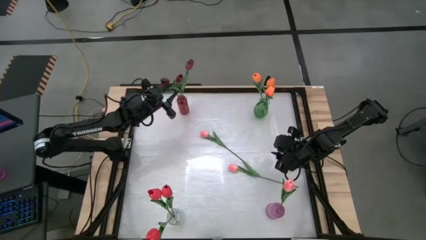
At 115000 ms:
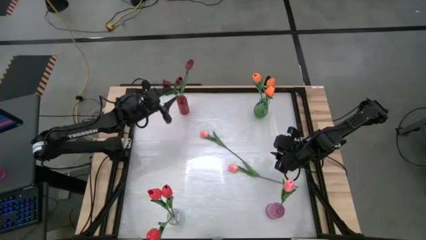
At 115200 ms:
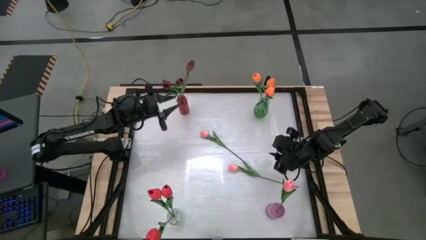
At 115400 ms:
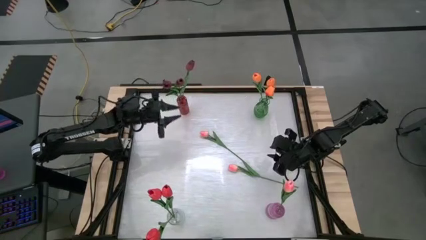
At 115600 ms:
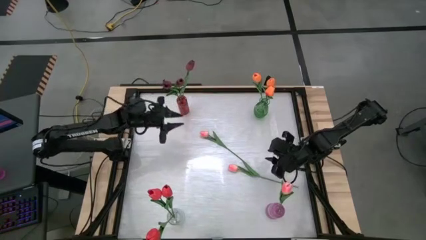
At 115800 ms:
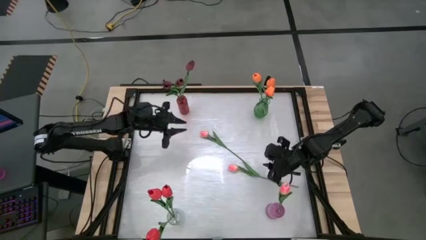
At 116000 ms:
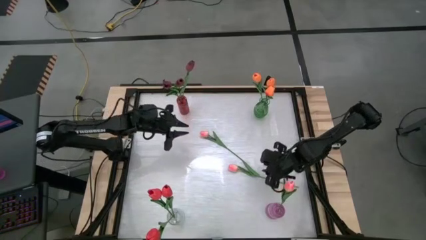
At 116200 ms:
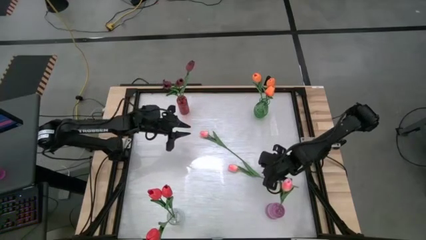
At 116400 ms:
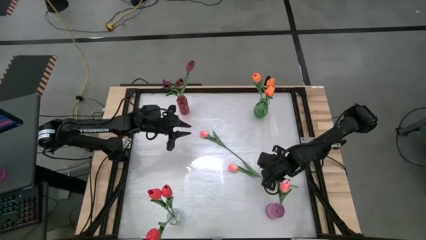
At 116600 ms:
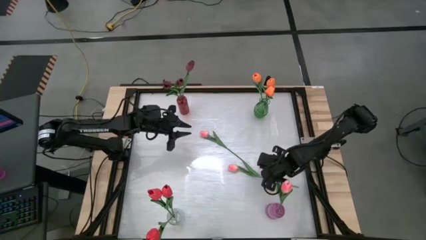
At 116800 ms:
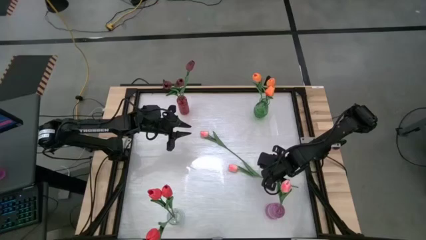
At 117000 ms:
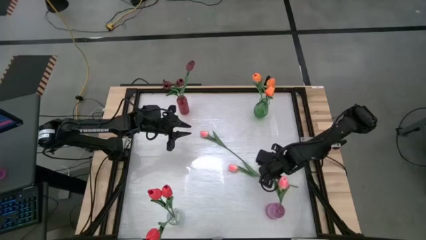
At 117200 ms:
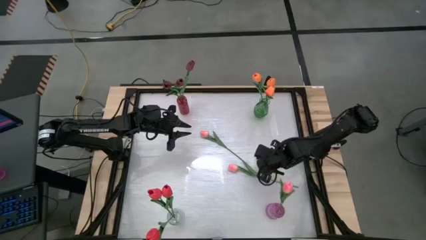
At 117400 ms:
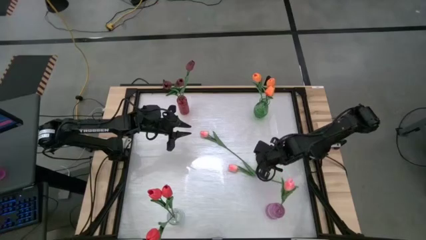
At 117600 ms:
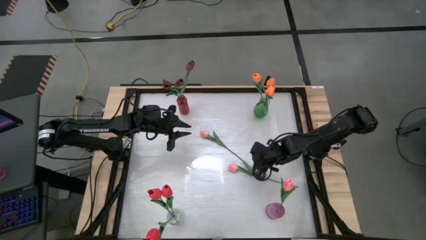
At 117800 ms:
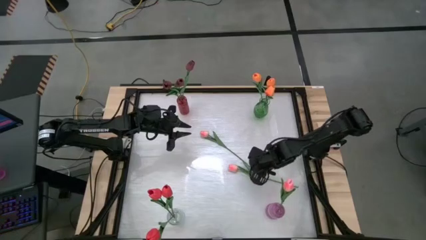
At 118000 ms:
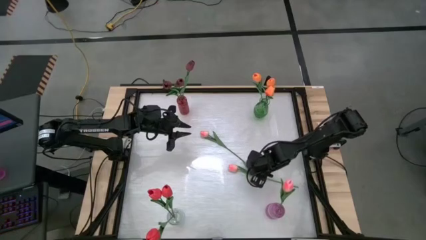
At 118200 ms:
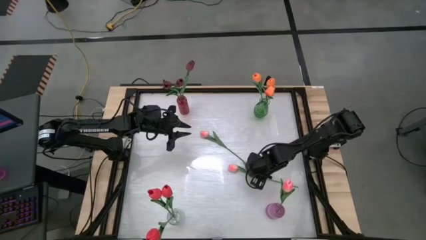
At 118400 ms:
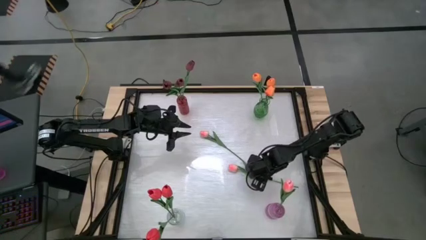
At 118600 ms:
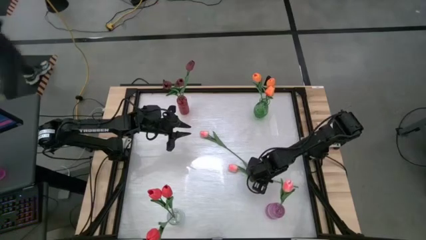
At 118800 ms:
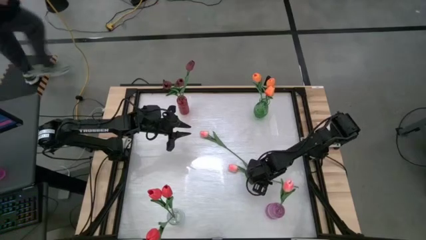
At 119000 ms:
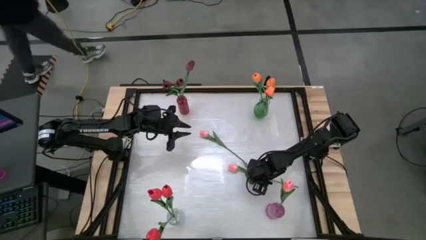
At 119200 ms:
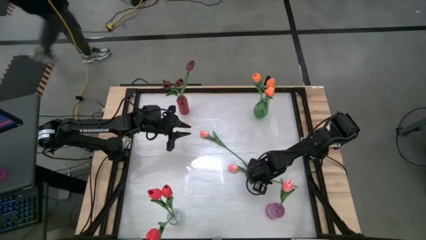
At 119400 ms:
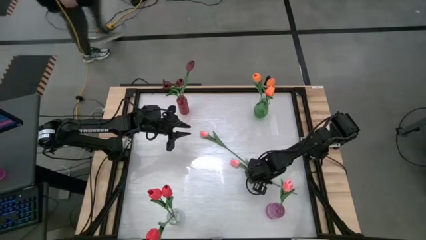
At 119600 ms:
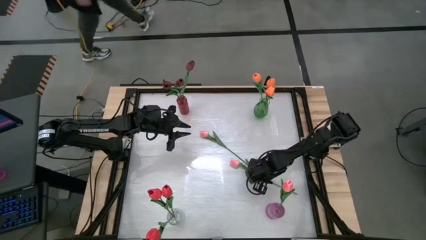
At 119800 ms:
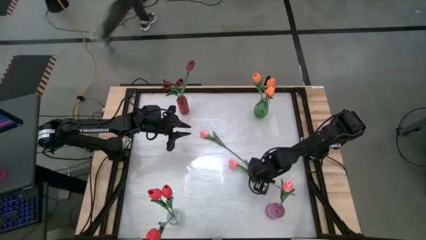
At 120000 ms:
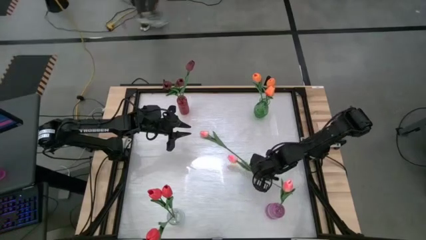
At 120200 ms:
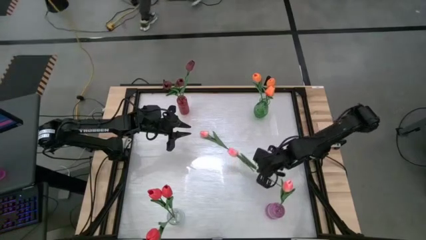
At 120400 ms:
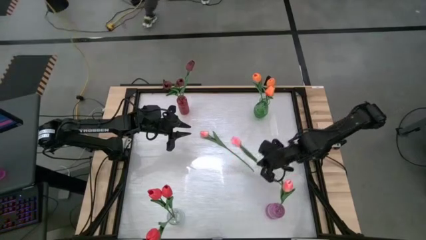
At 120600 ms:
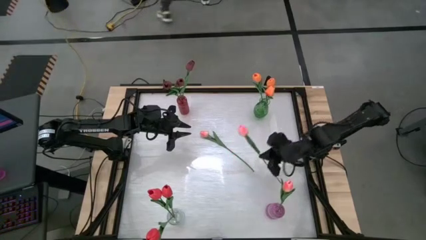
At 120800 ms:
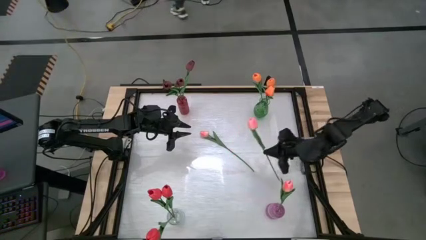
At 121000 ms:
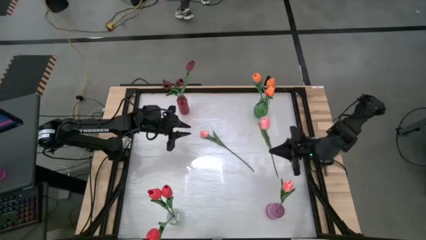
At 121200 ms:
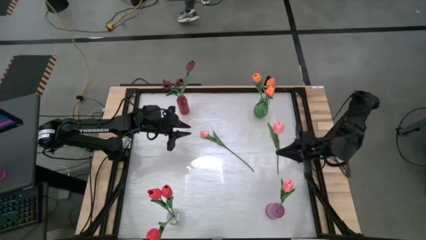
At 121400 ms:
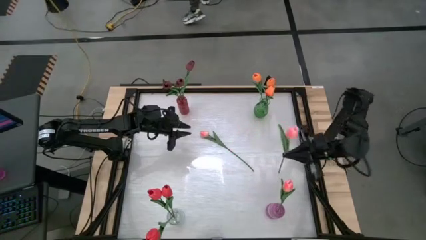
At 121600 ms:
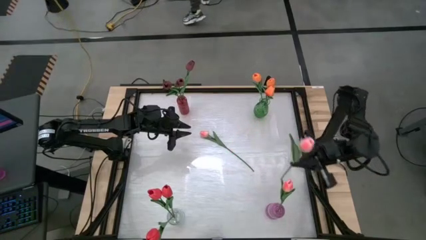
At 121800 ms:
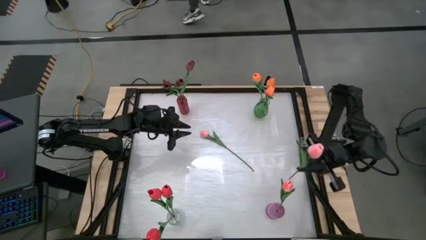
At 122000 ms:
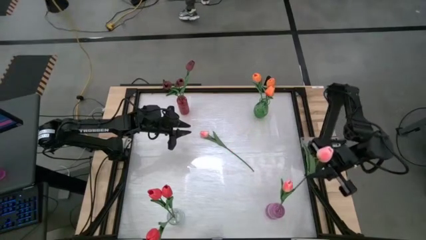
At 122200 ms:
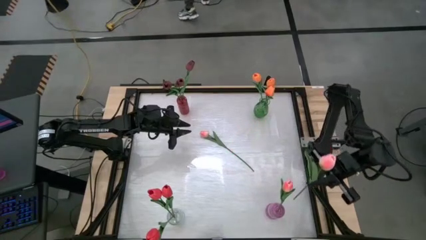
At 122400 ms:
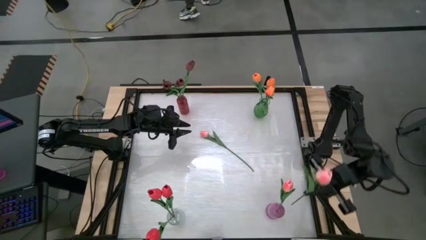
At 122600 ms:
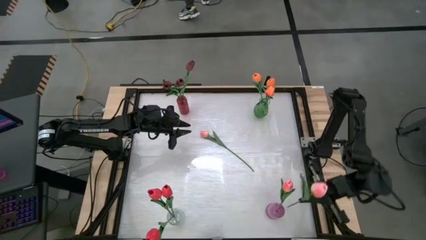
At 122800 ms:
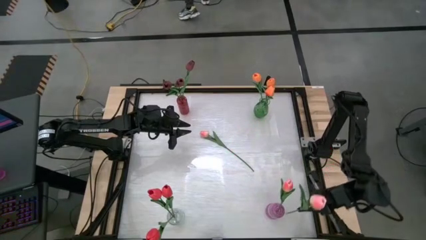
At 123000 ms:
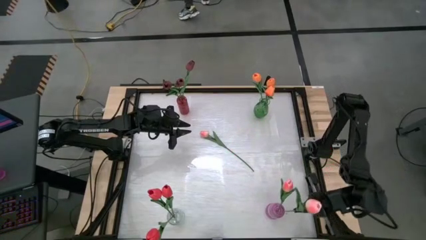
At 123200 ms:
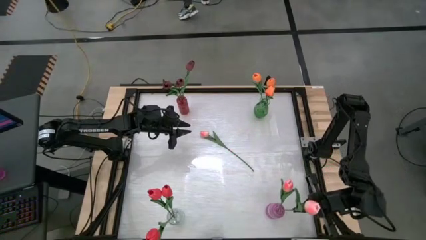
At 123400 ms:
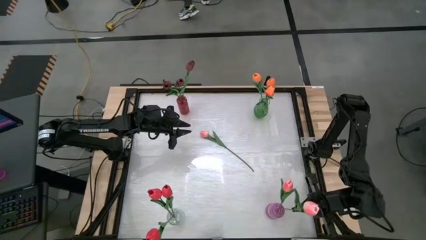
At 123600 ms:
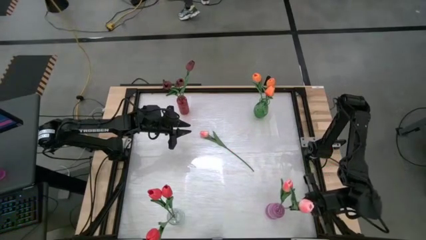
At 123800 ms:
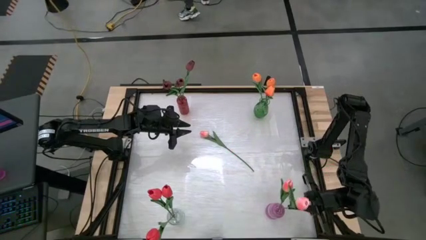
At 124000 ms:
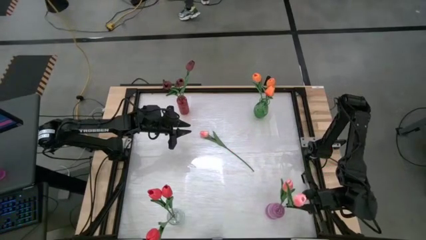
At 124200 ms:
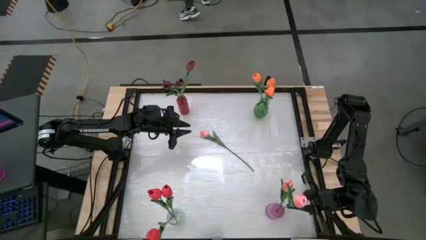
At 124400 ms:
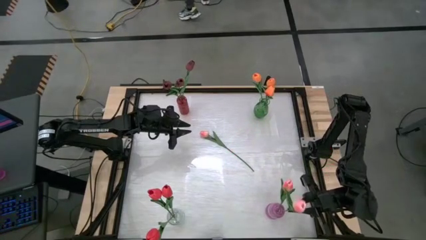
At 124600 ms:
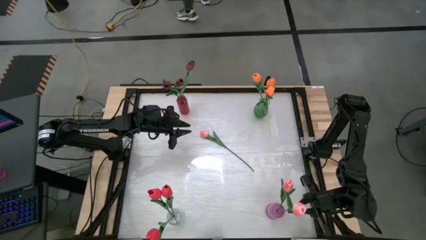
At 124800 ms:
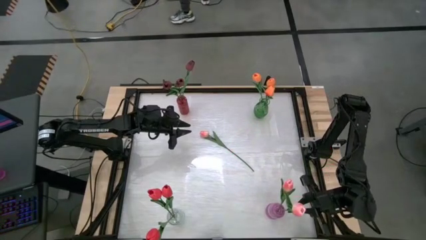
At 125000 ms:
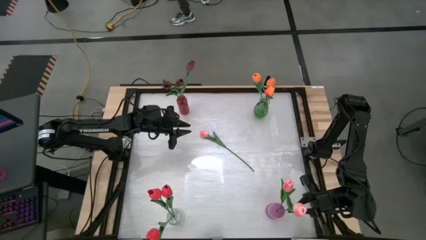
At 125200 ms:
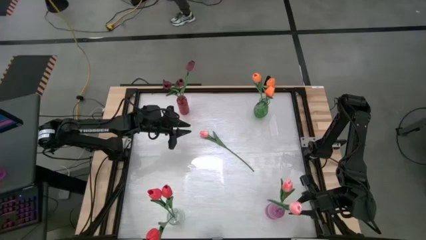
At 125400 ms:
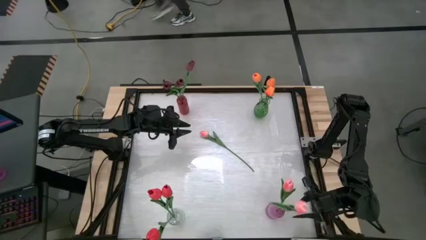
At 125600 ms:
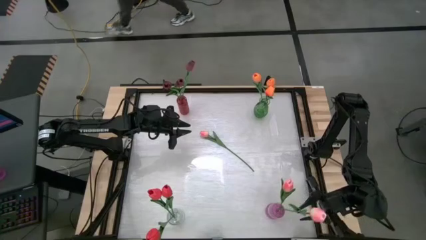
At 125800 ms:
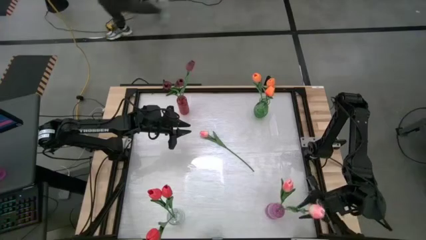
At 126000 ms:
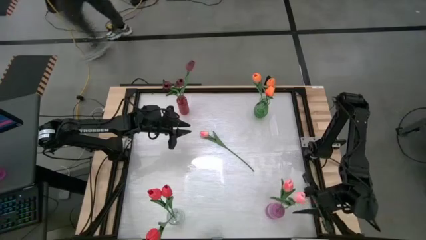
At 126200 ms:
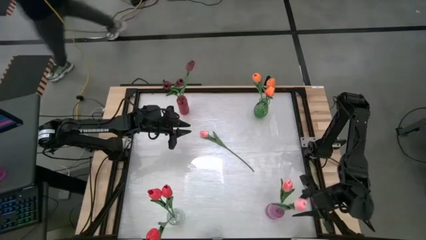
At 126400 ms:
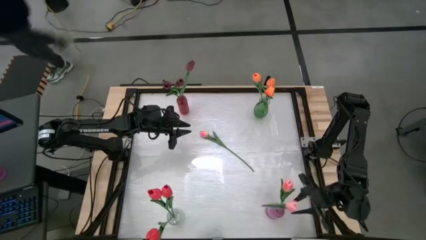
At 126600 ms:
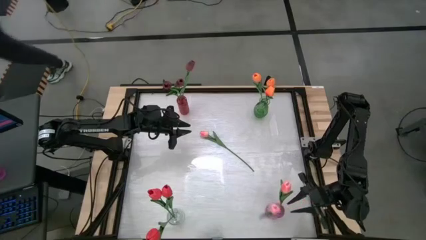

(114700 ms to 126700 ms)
Task: Sort flowers into vase by color
Put the pink flower into the purple vase

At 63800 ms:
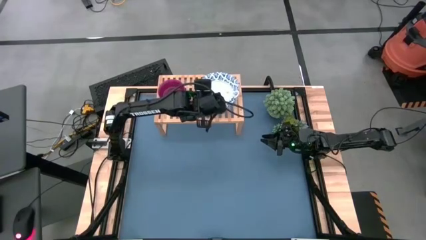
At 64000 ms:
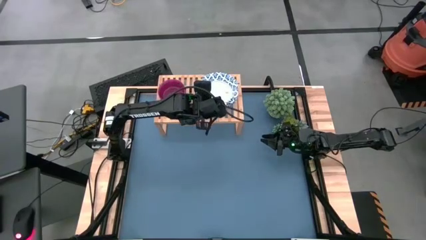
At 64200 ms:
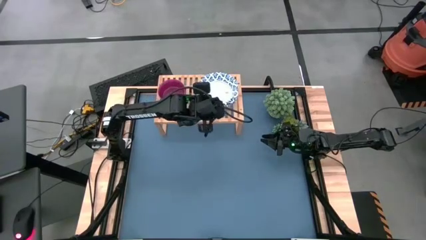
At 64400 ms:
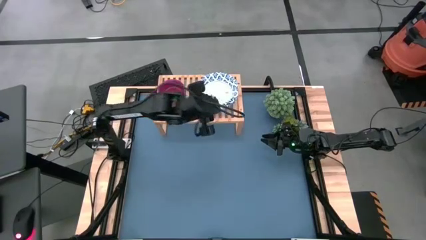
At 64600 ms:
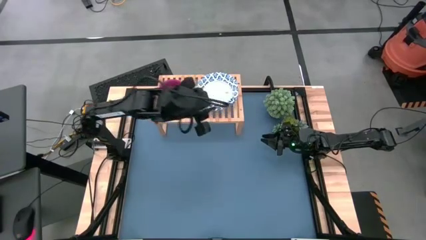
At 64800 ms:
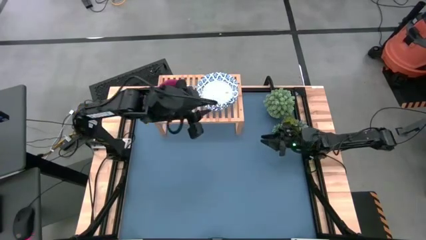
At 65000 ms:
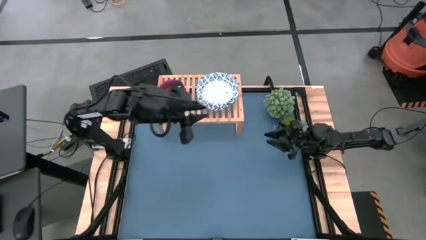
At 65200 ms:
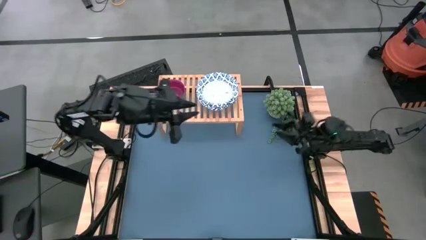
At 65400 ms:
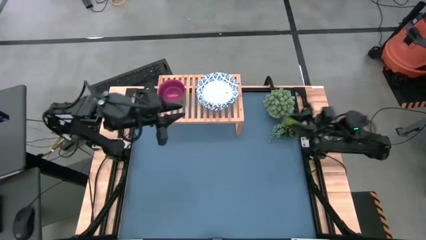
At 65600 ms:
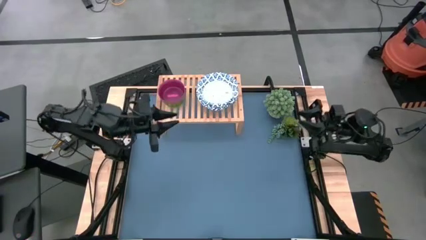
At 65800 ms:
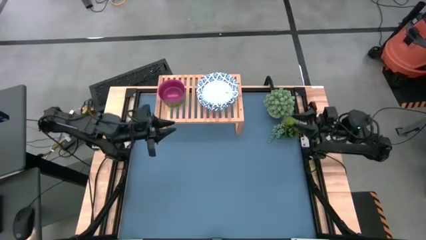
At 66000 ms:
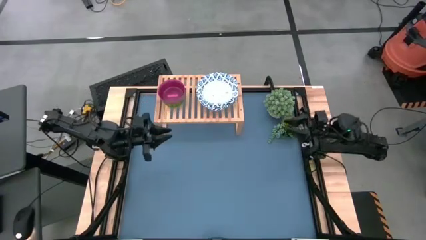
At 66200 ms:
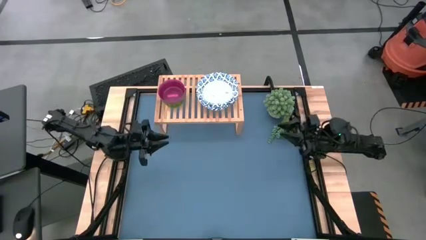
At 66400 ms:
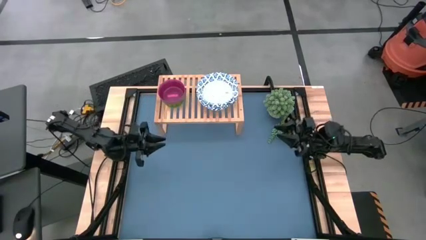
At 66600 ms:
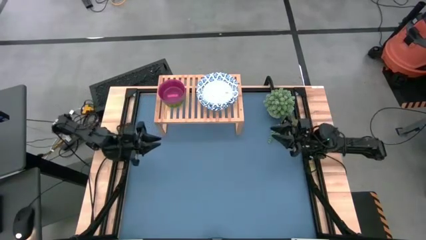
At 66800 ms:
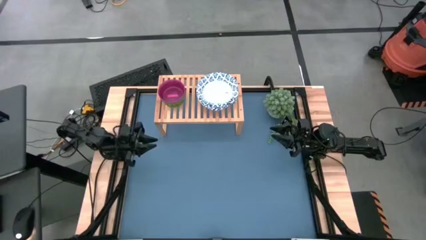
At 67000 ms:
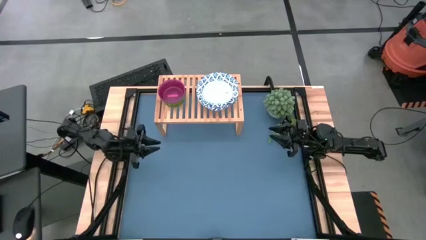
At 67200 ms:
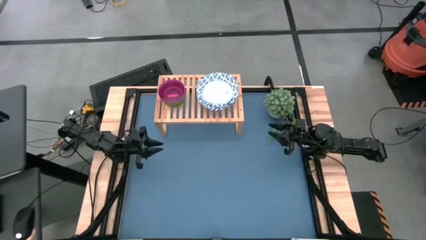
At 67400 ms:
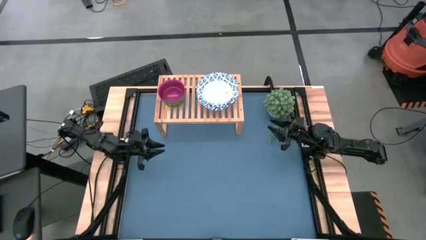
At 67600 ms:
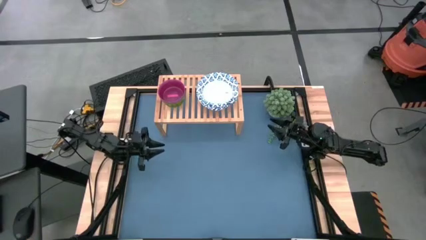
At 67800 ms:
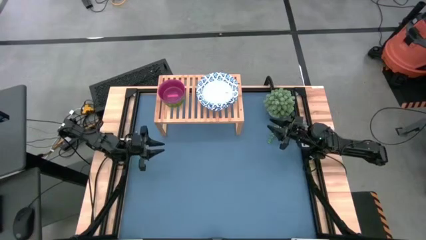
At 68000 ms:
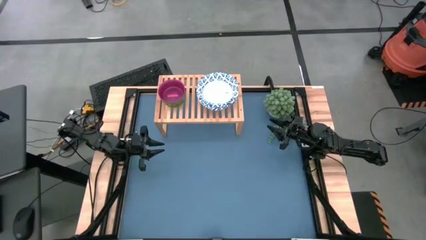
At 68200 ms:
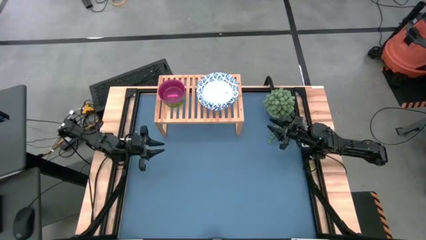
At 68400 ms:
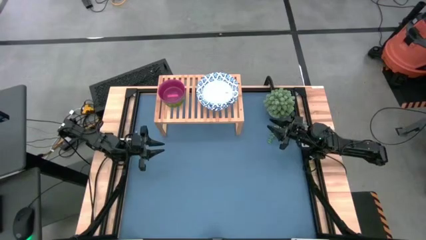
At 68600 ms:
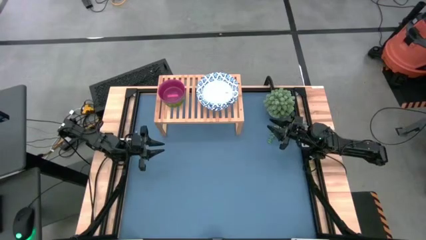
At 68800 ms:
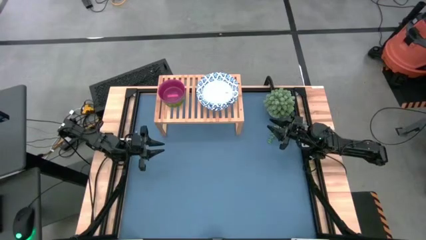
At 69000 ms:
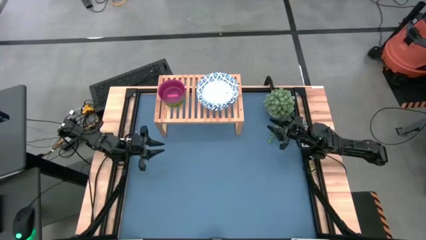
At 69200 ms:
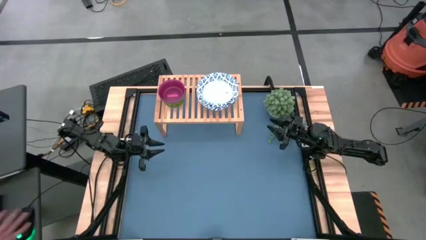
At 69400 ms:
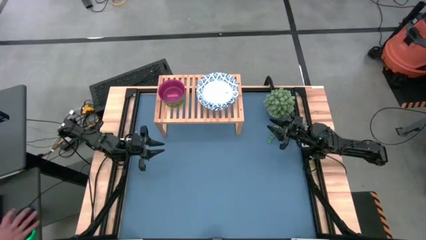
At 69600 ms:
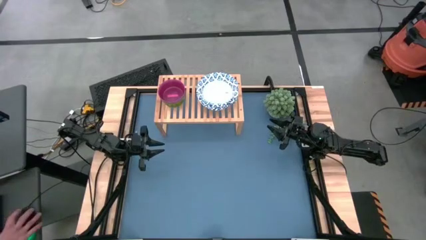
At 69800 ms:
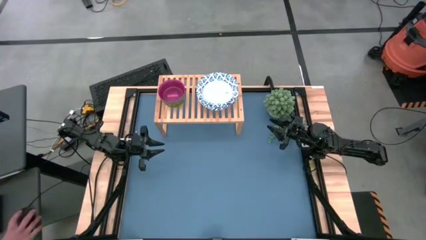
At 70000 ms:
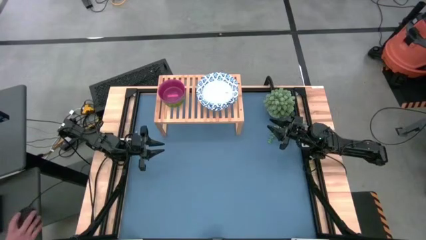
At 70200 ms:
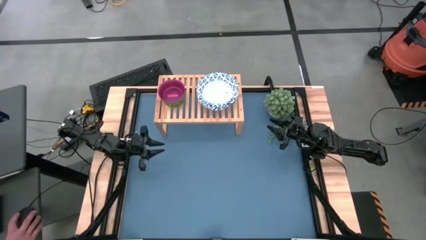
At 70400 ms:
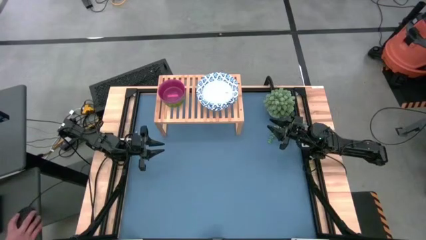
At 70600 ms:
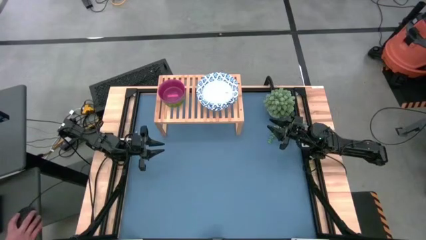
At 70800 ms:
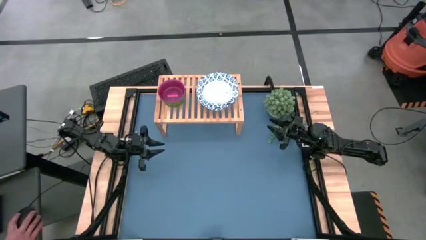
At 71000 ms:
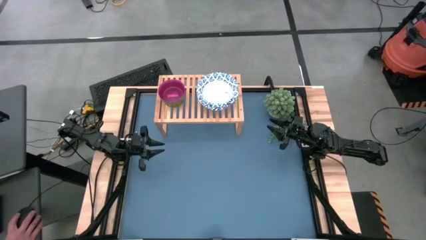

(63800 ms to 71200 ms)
Task: Place and stack bowls onto a shelf
Return to Home Position
